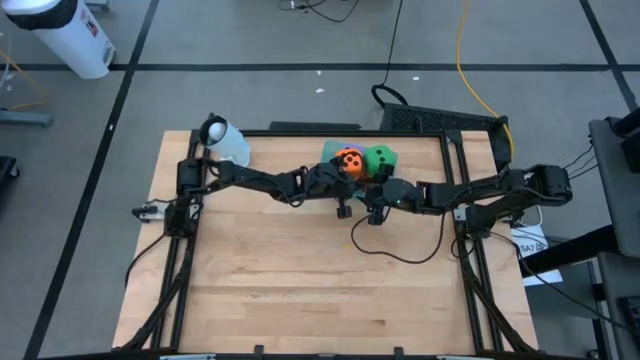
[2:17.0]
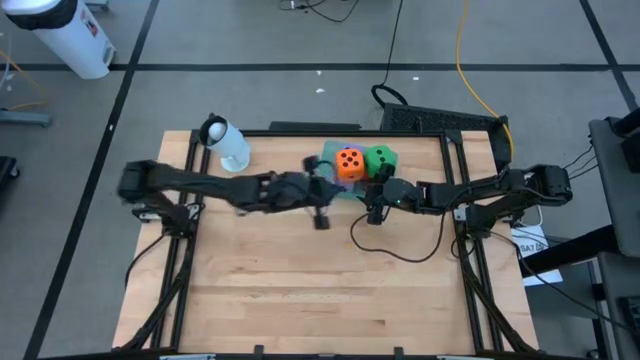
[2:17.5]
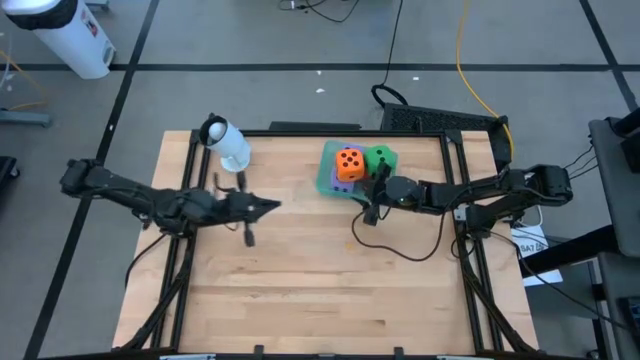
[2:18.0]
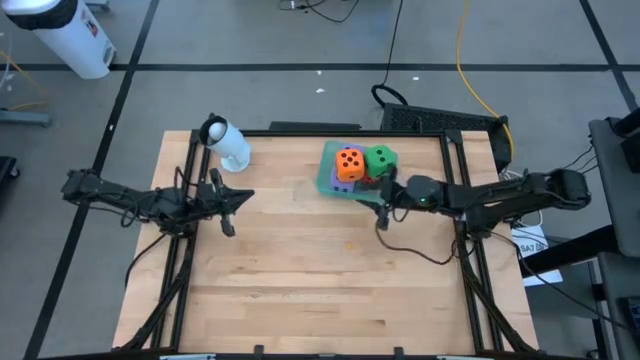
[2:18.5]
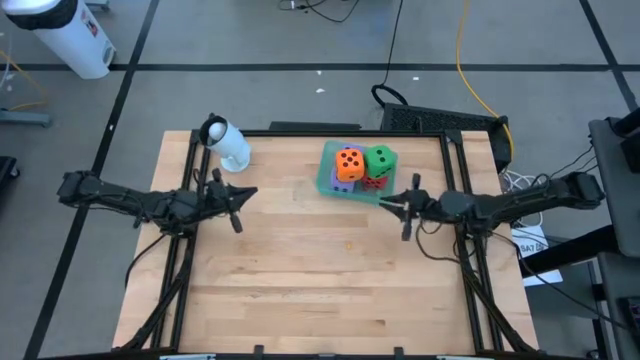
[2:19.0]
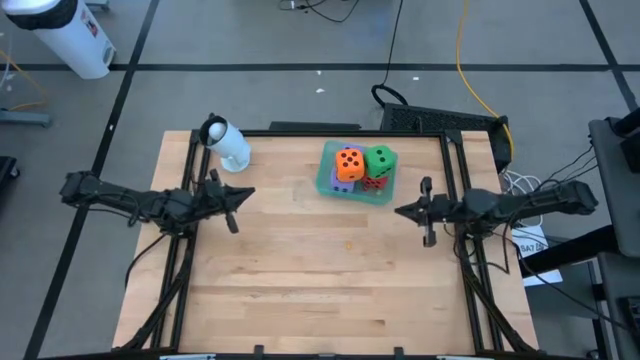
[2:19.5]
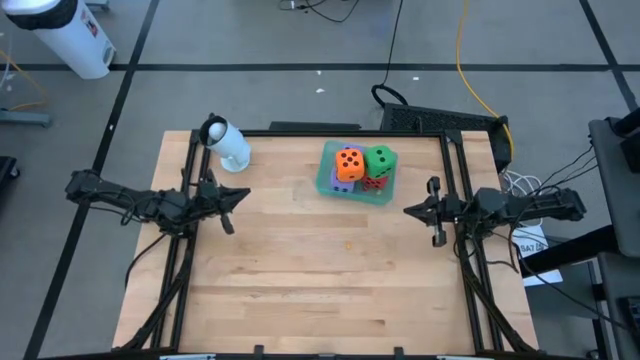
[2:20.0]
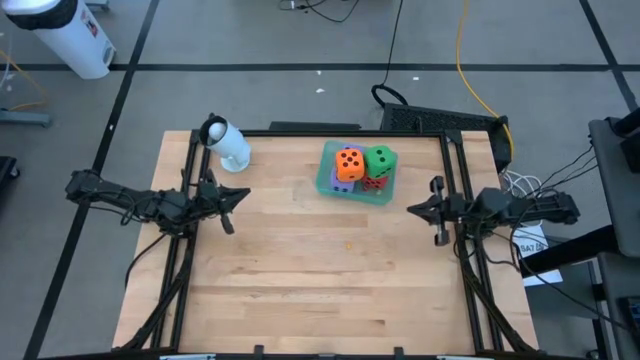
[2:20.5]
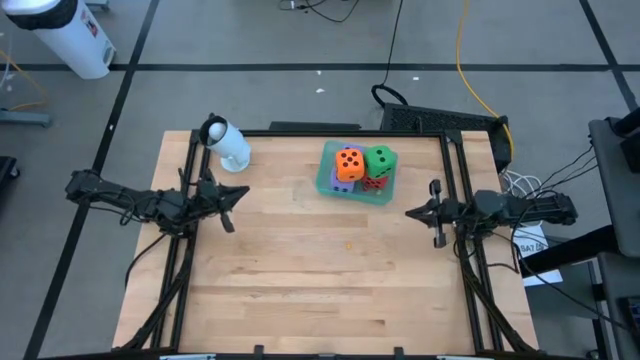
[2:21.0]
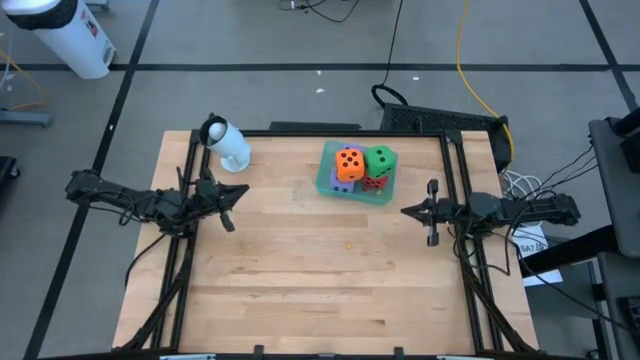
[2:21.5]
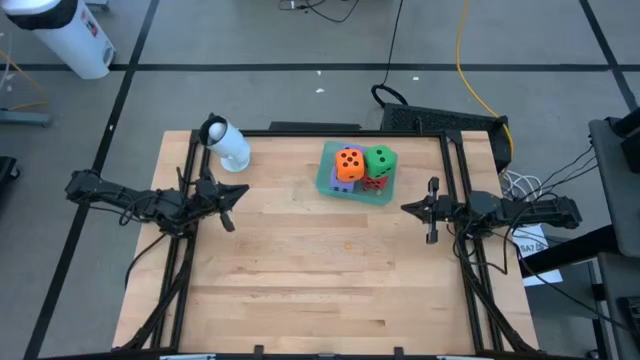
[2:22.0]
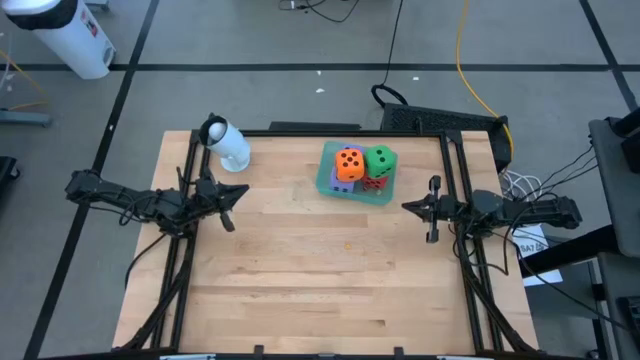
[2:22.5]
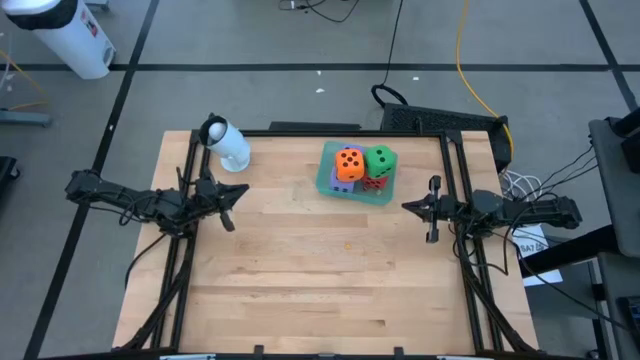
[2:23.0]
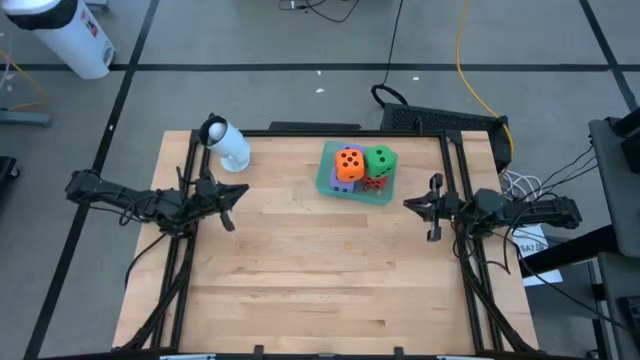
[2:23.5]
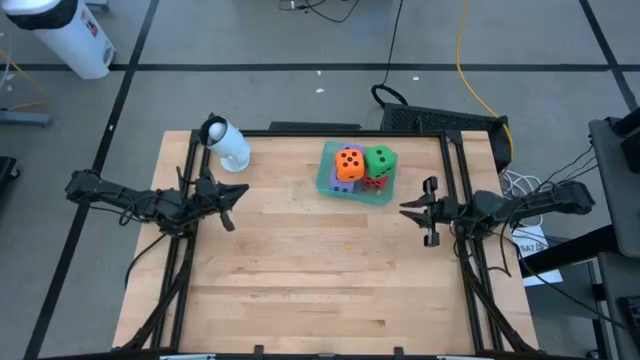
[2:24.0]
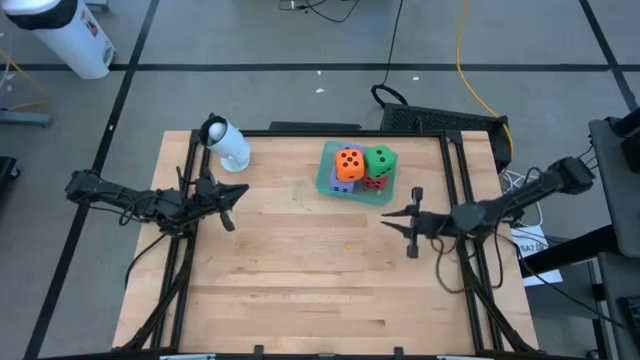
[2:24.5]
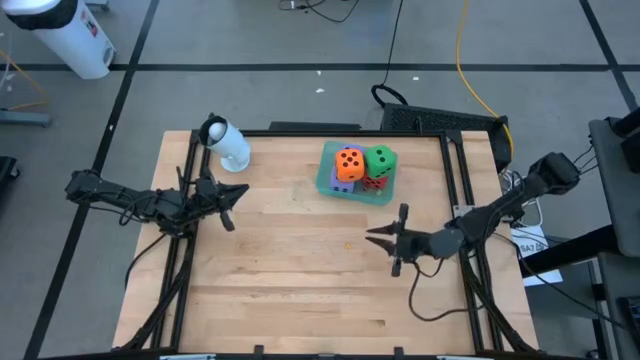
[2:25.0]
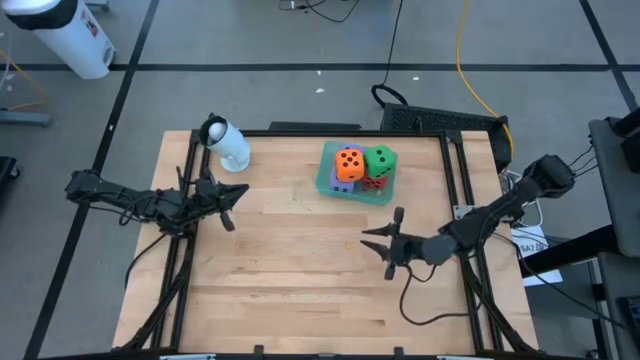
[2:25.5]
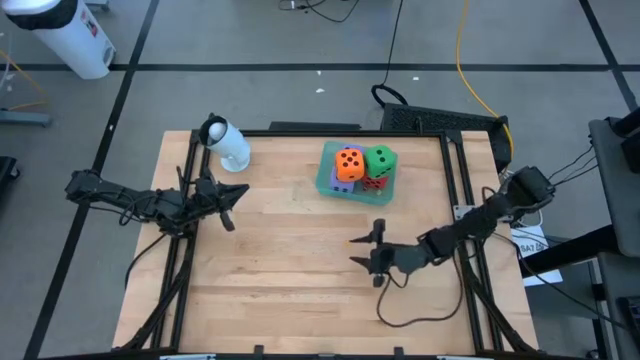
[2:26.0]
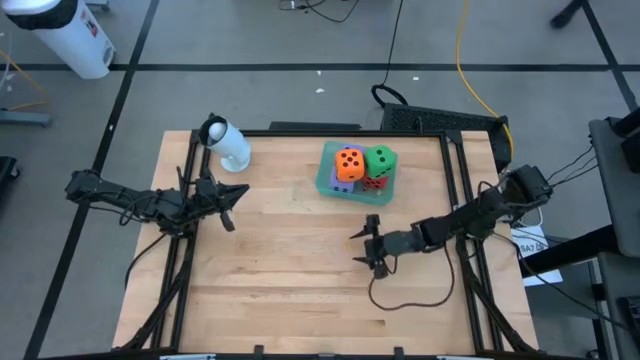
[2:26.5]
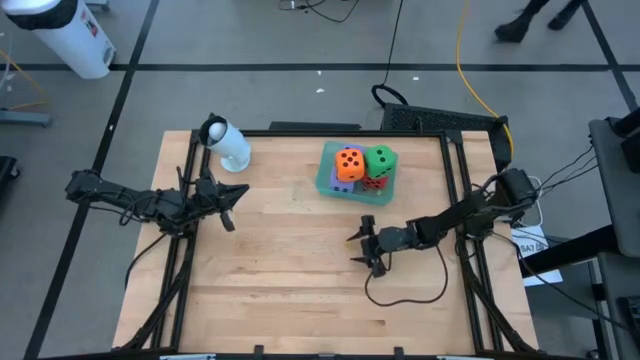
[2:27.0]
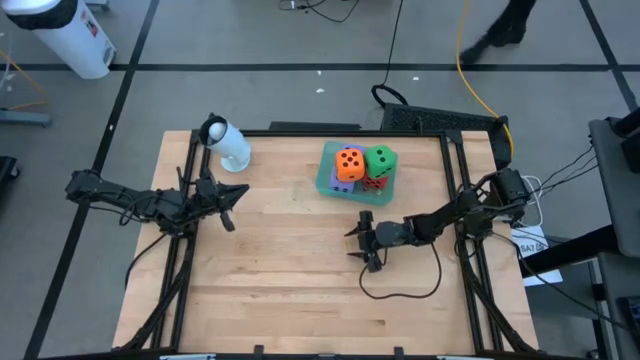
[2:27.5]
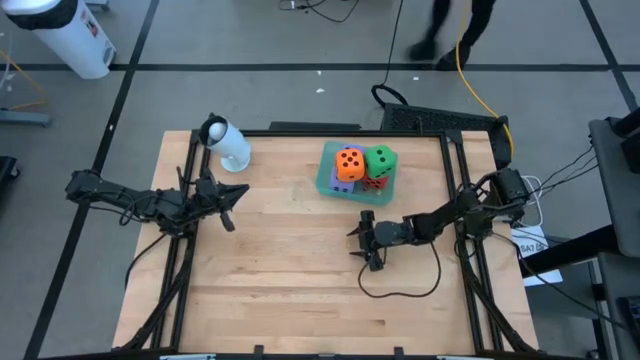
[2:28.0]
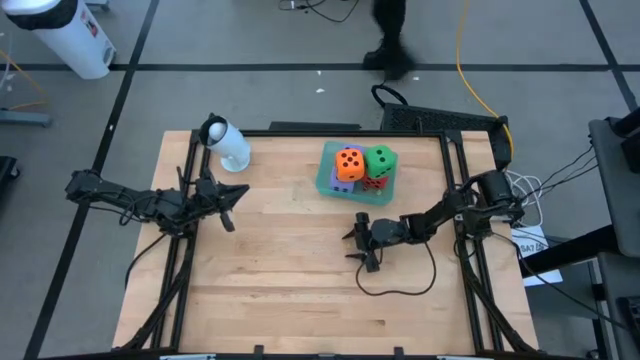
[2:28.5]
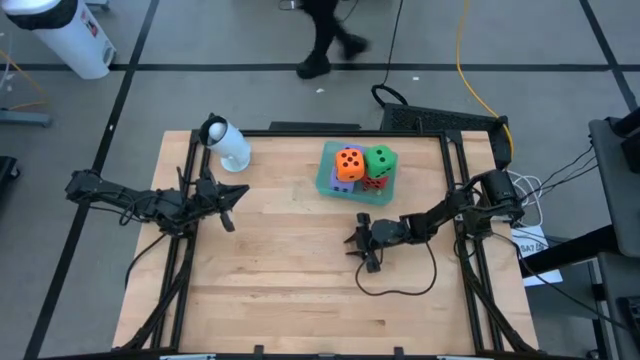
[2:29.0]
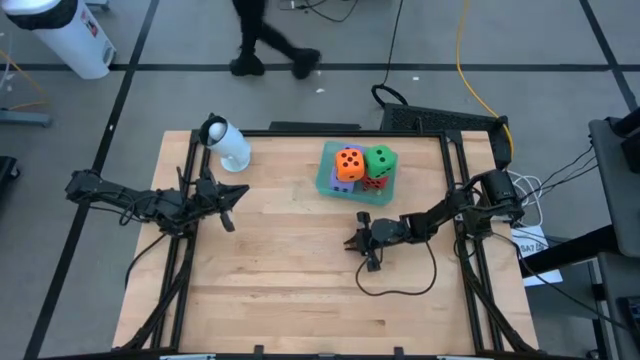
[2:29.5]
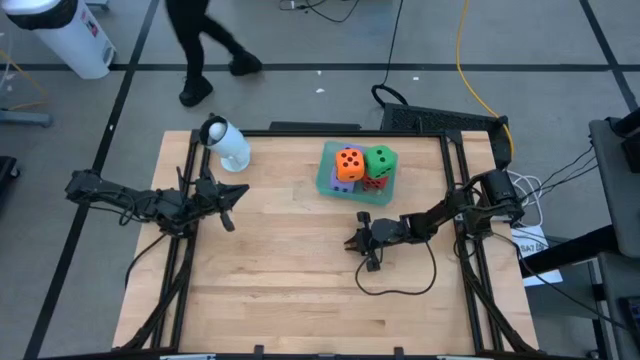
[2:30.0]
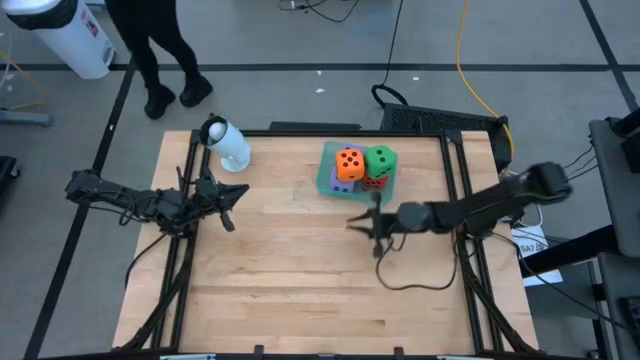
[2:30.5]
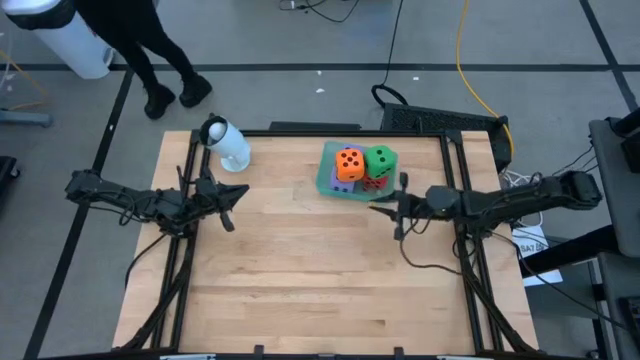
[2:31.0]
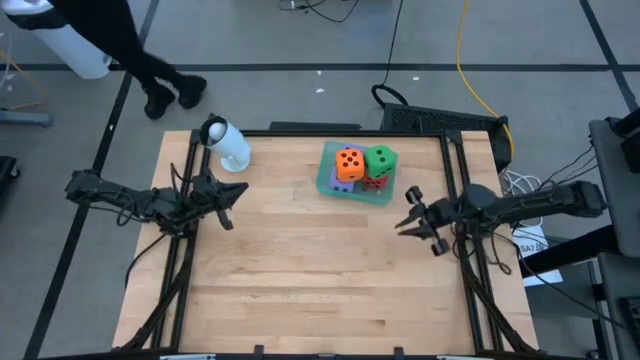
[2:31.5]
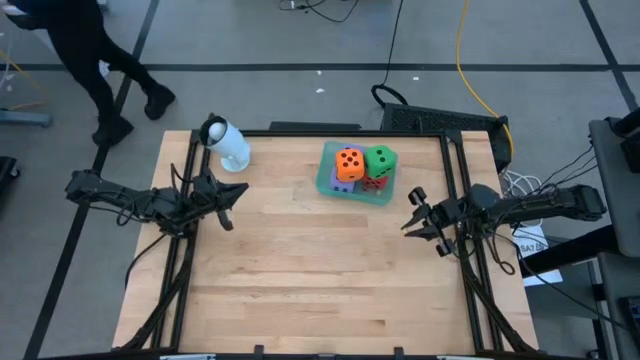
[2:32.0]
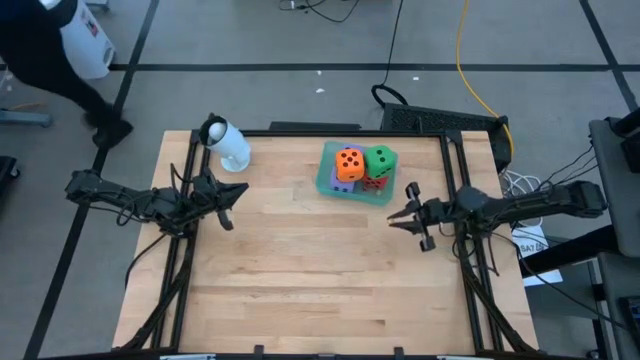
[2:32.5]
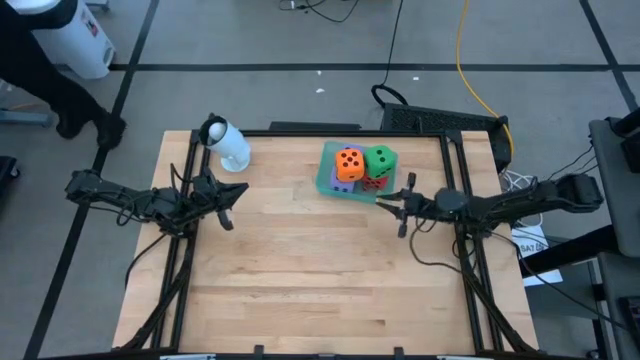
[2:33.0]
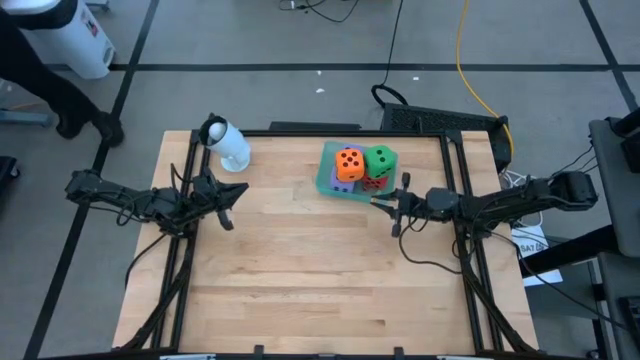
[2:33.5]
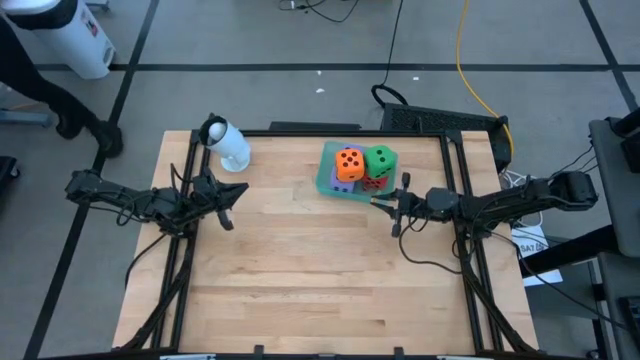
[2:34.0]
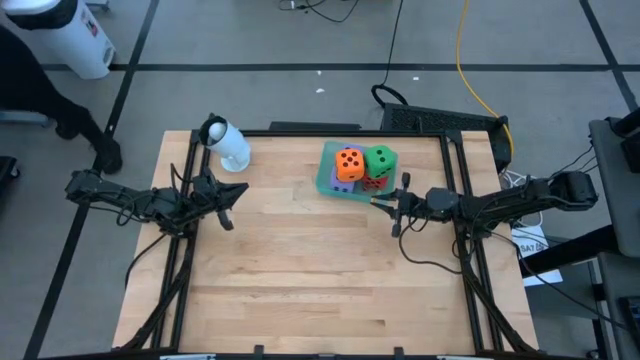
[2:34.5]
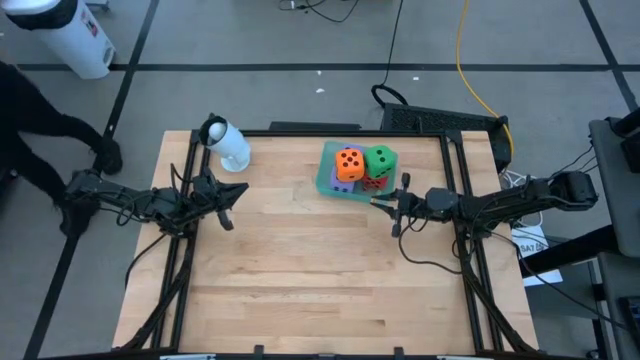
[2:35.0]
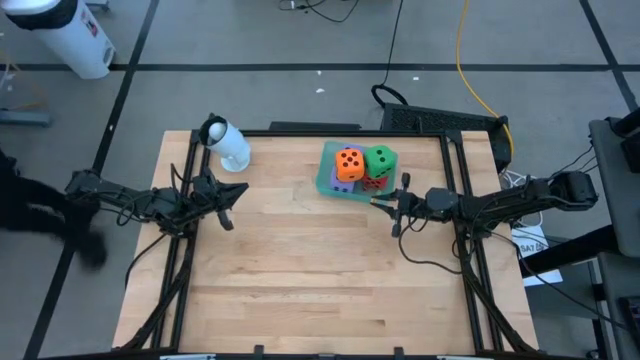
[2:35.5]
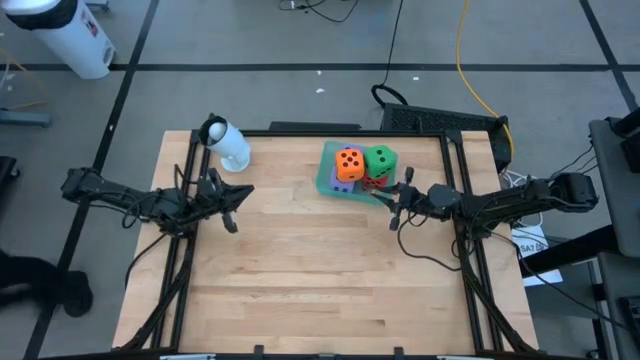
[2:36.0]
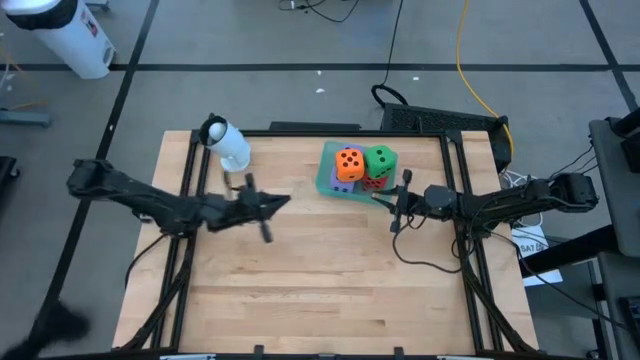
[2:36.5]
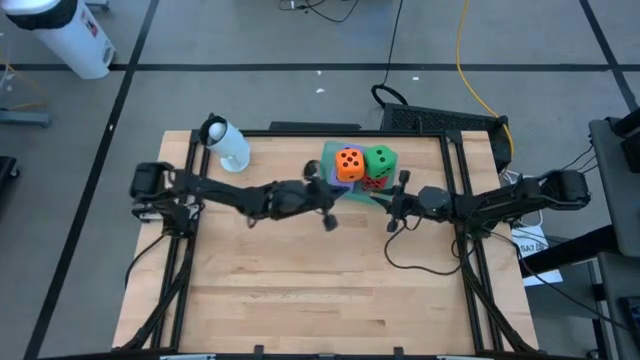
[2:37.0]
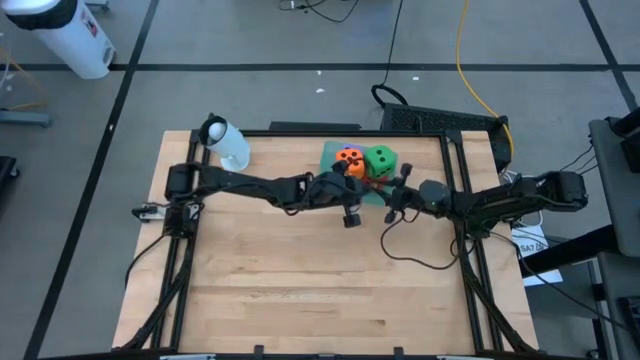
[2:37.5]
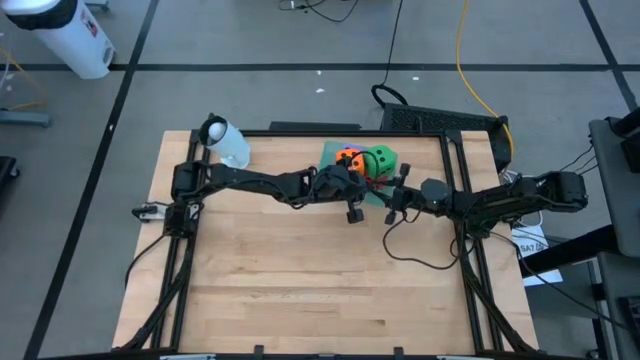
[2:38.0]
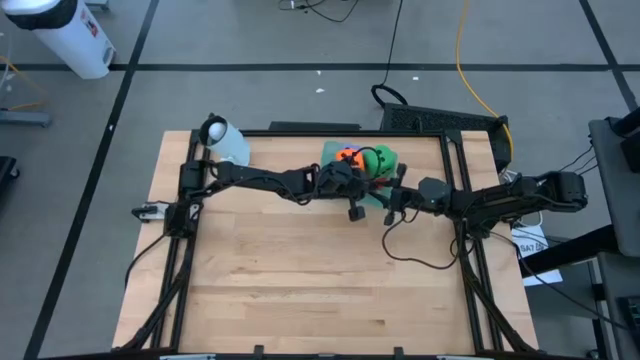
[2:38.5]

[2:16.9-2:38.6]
Task: Pick & Place Dice
Put the small yellow die into the bin
